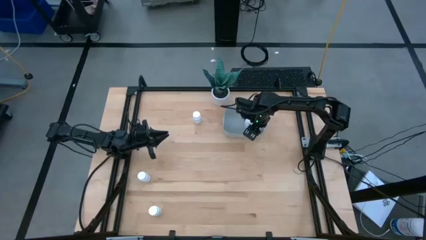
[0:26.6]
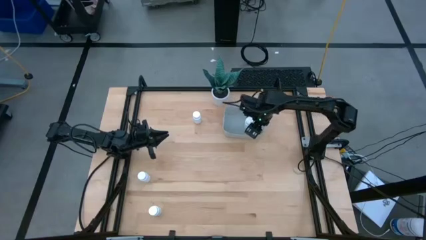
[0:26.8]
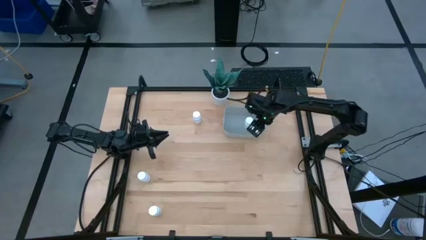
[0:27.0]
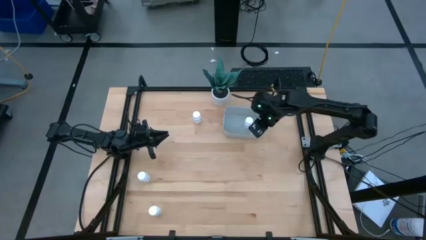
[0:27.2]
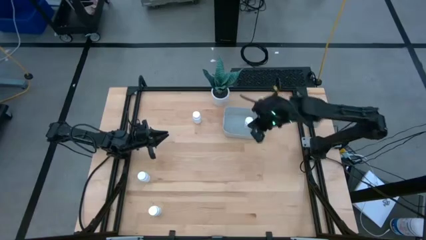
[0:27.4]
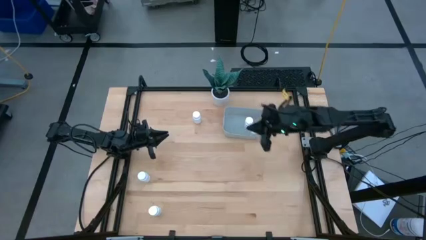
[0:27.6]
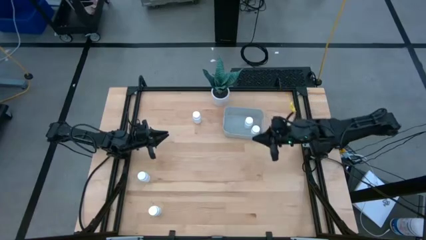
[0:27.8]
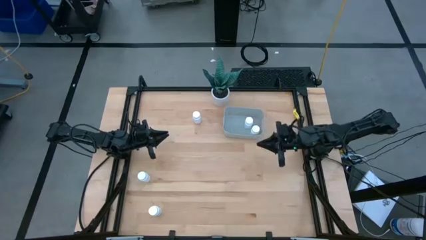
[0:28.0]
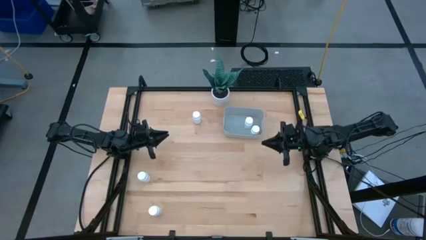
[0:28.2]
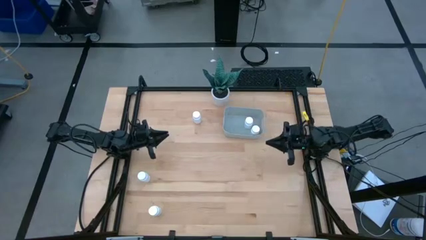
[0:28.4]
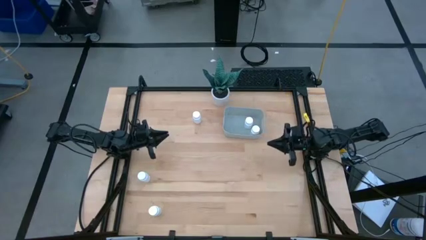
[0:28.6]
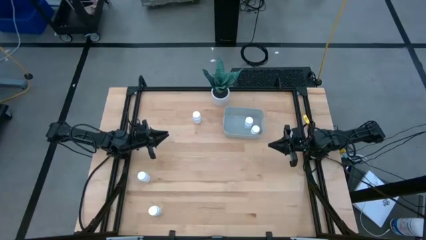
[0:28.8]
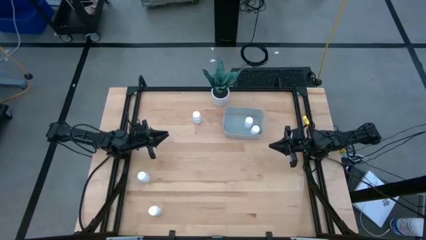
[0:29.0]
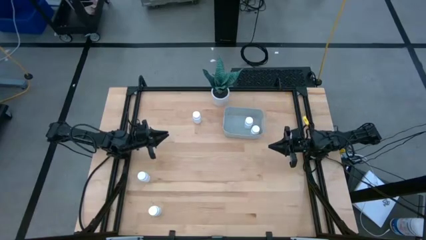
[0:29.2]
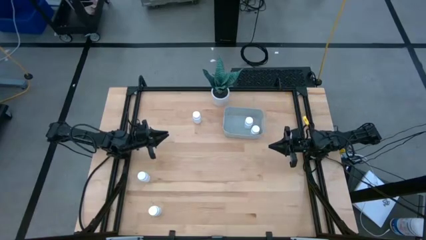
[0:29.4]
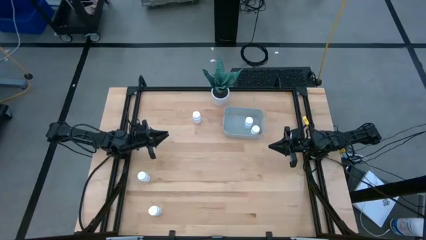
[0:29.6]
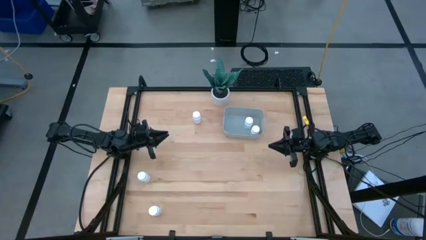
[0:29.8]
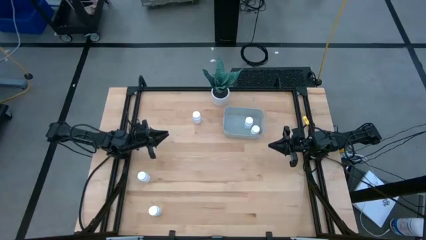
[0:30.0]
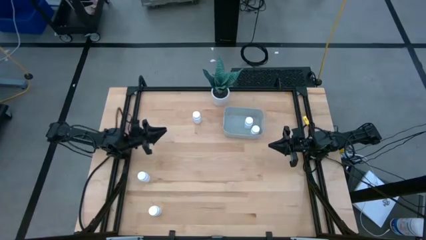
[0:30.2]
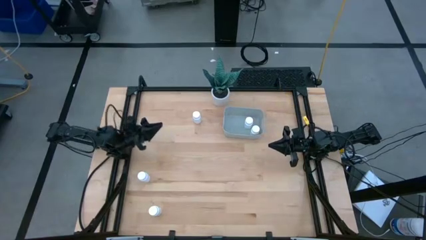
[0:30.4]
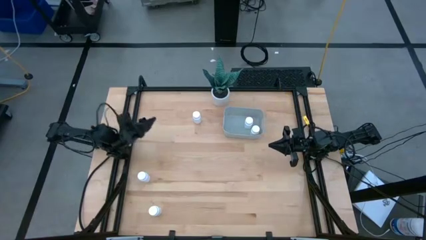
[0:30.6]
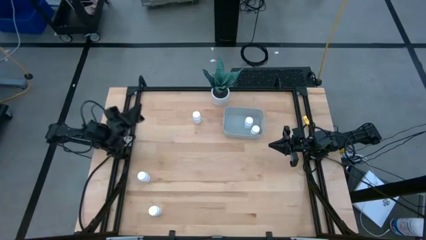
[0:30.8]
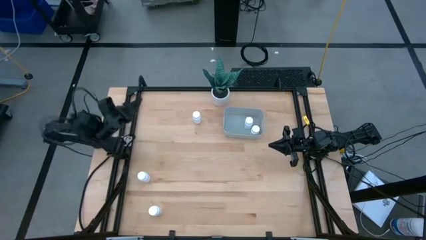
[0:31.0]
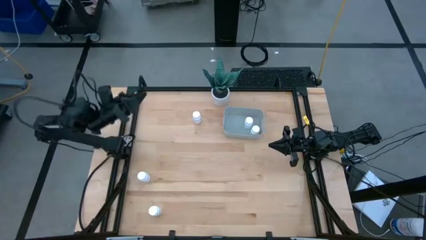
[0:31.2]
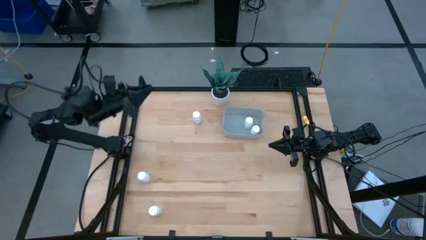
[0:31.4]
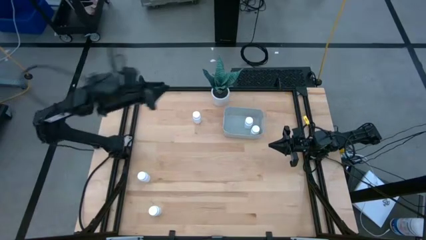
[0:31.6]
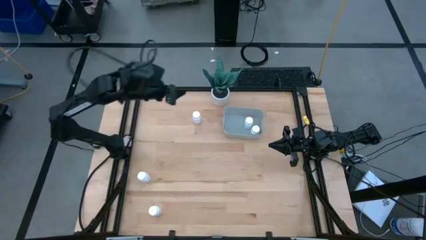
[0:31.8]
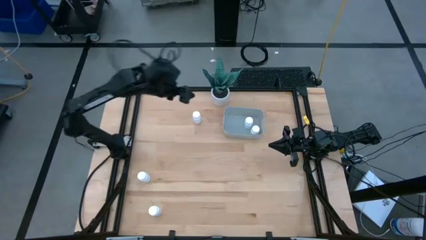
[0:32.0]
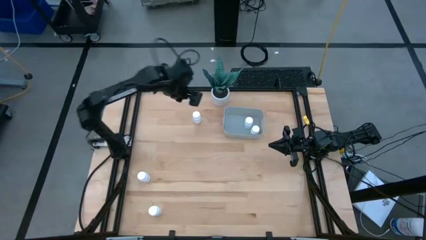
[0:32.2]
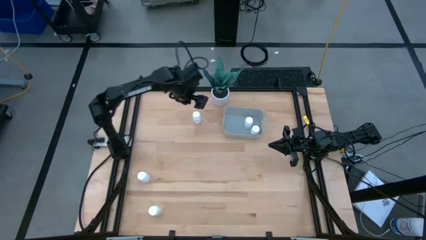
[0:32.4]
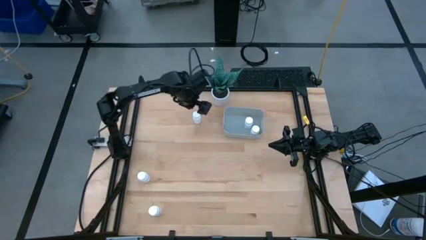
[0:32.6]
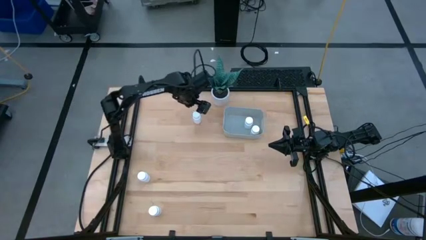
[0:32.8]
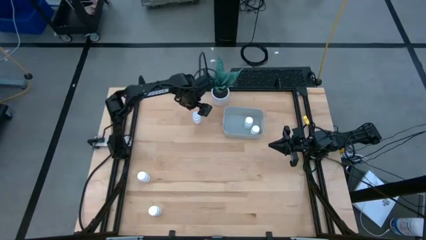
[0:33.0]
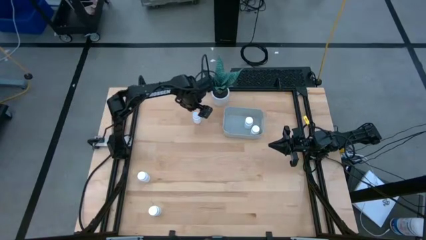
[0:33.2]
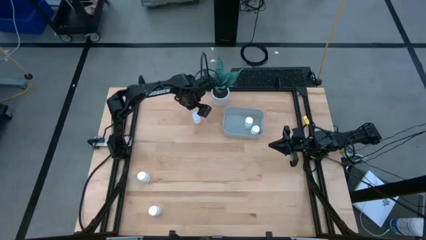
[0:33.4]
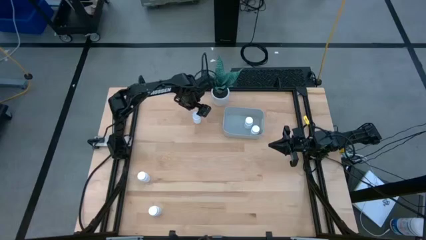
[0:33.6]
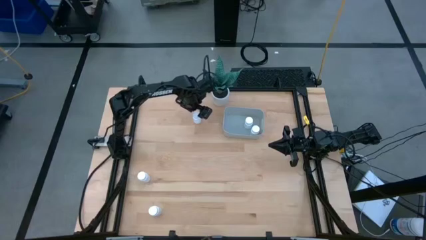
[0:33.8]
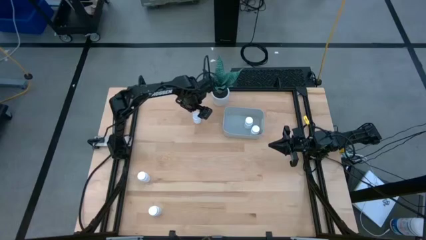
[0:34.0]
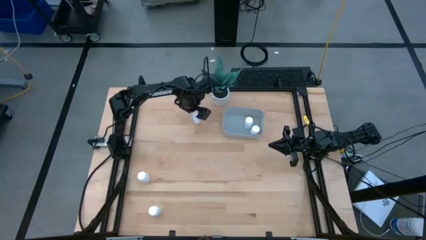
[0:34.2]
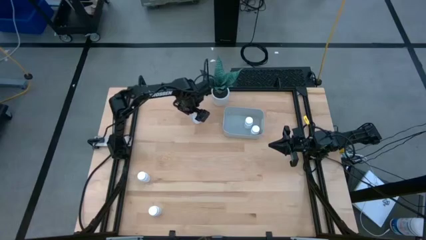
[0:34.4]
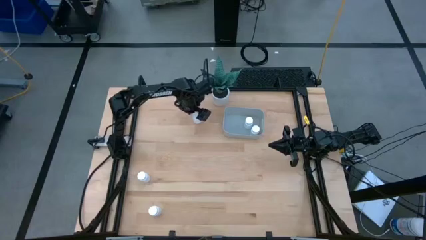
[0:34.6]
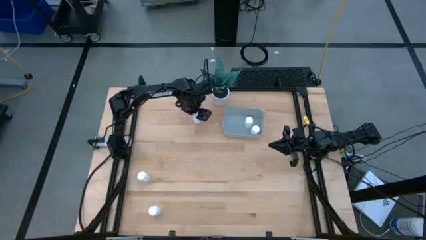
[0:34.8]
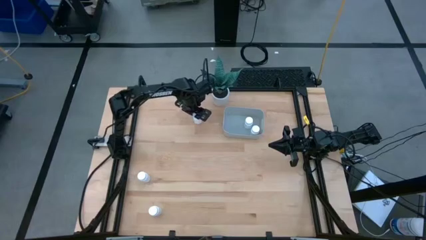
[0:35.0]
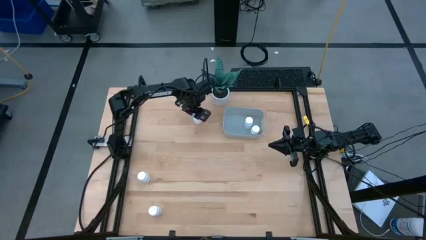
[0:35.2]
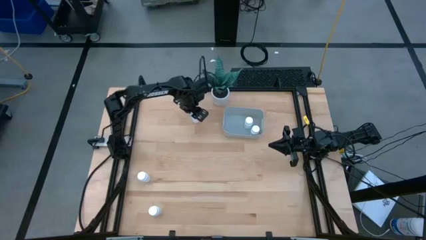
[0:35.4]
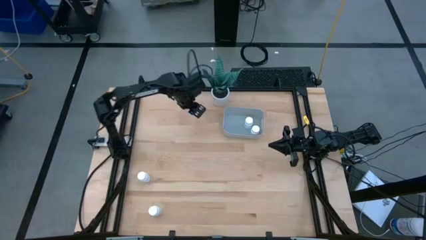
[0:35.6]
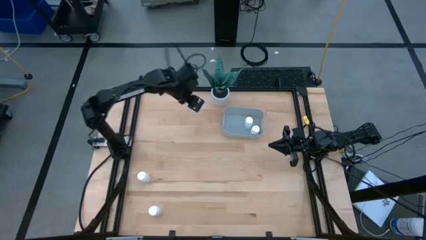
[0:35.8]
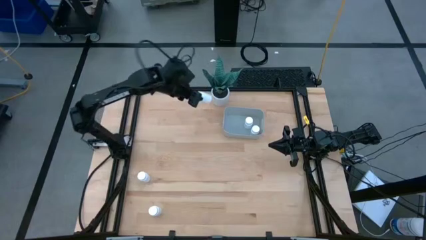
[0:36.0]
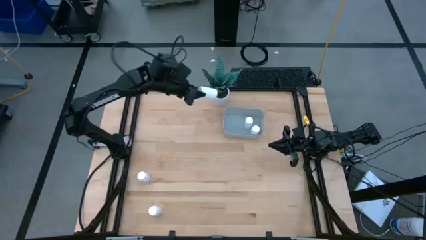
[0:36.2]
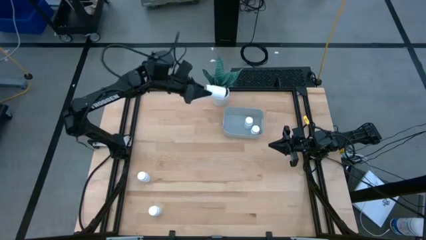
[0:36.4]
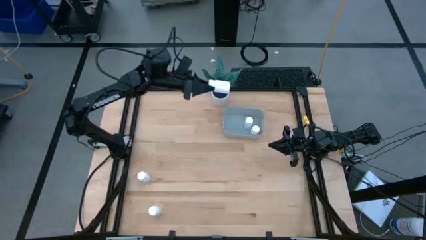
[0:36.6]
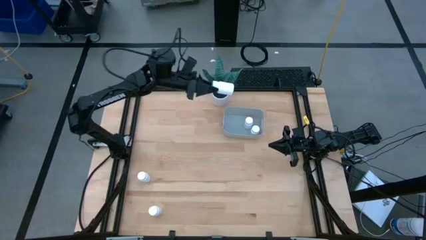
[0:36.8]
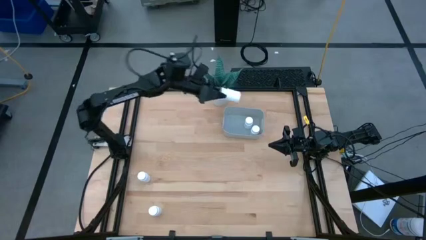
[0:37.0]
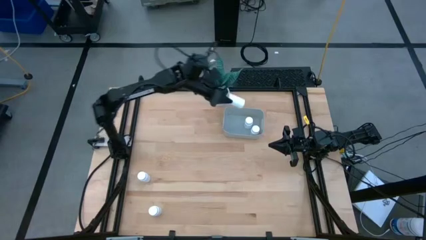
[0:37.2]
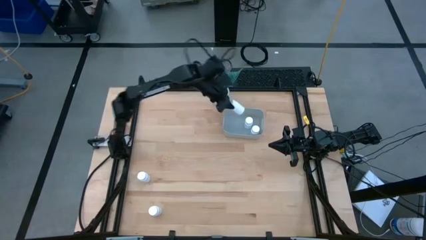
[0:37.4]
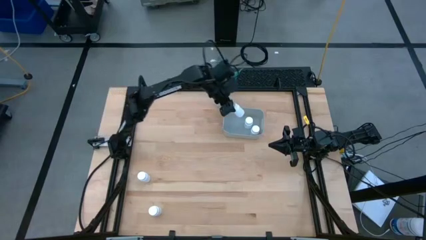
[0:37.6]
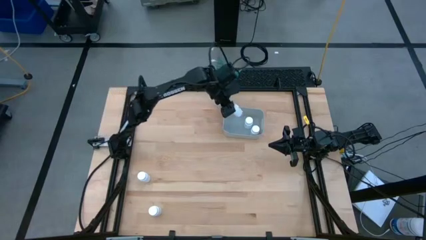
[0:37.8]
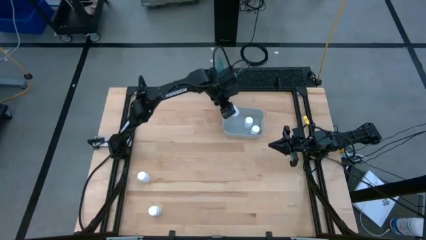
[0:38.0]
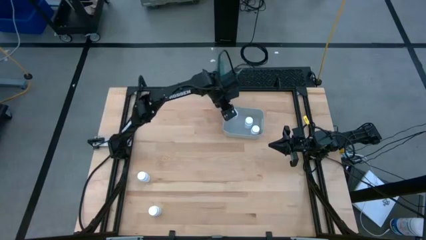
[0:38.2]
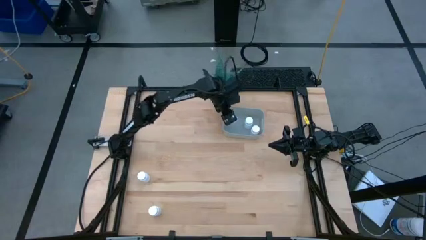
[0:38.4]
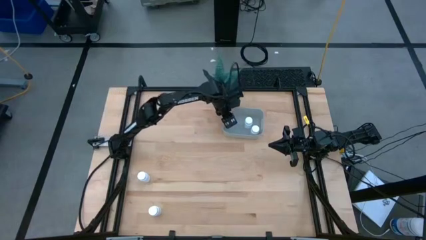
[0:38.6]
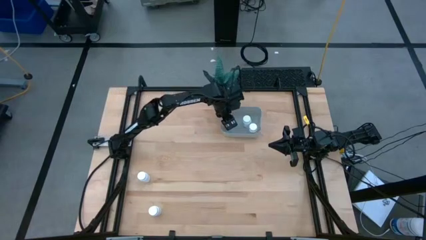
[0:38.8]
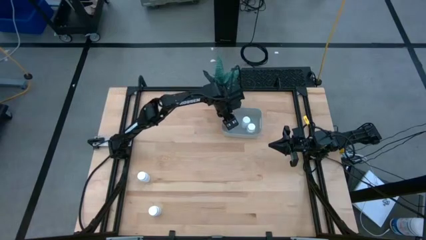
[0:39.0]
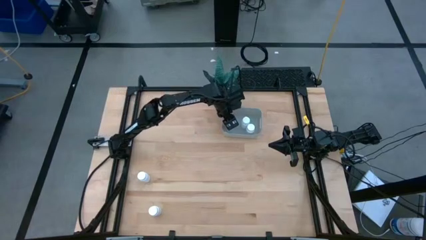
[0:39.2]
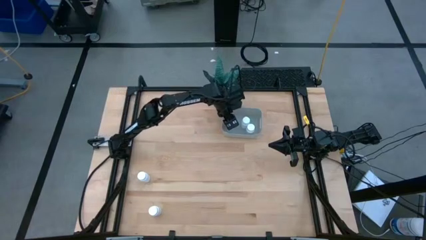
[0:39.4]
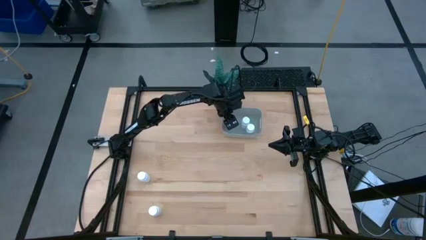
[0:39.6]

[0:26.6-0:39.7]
Task: Pick and place pill bottles into a basket
Put the white pill bottle into the gray bin

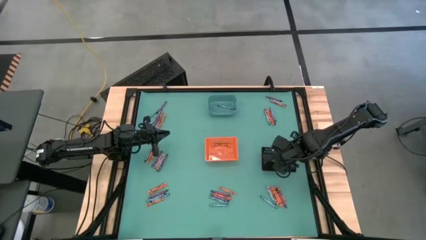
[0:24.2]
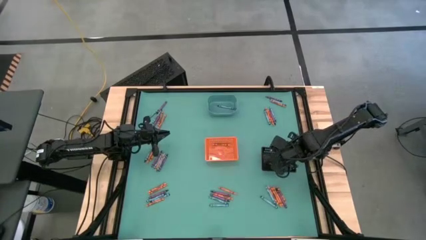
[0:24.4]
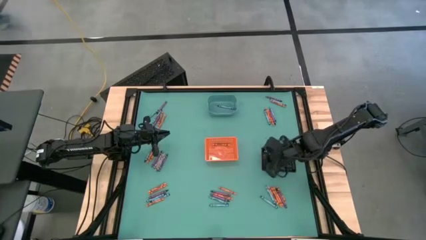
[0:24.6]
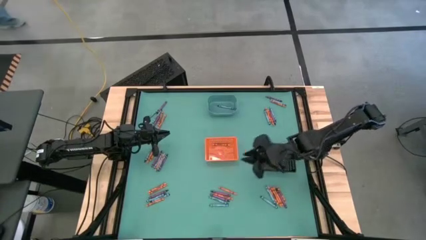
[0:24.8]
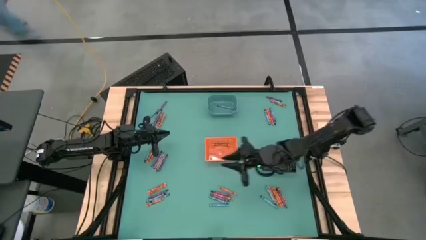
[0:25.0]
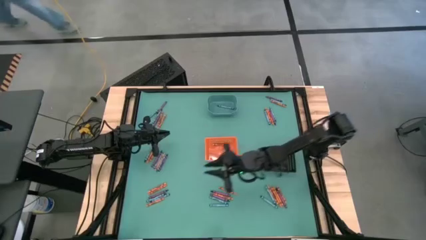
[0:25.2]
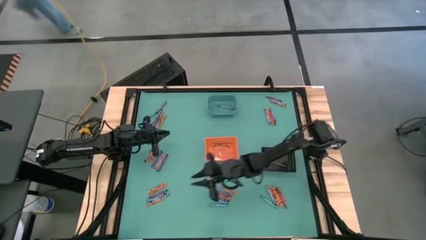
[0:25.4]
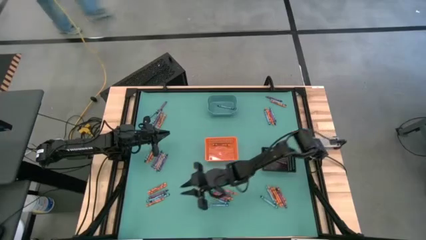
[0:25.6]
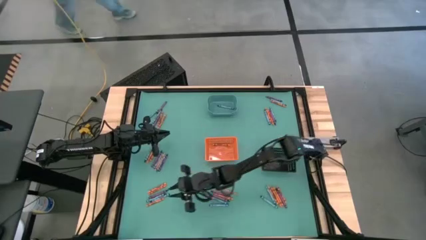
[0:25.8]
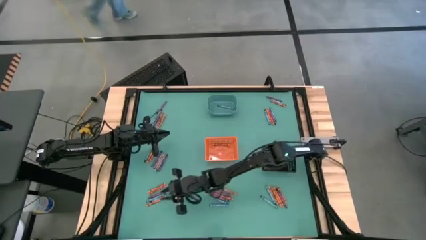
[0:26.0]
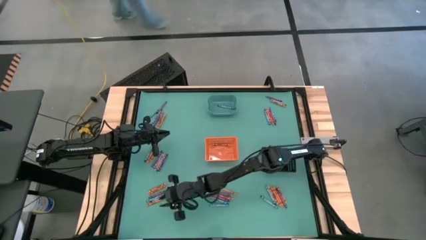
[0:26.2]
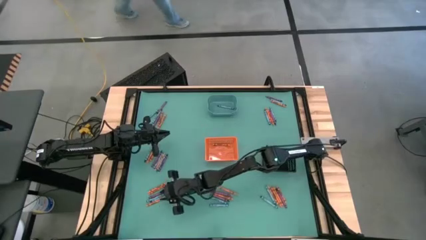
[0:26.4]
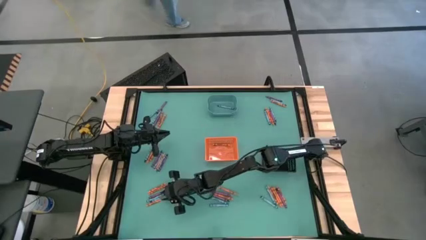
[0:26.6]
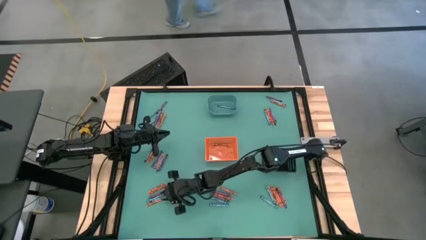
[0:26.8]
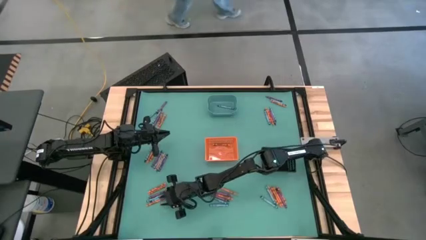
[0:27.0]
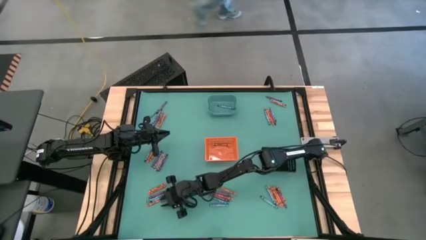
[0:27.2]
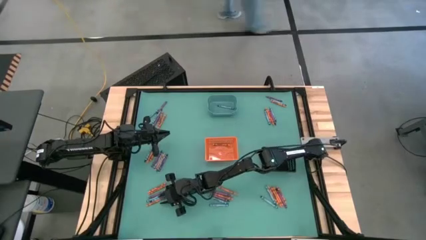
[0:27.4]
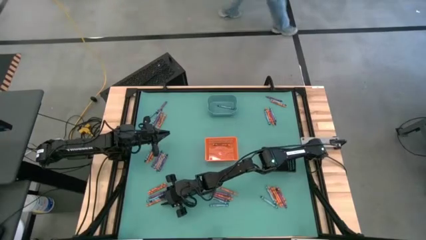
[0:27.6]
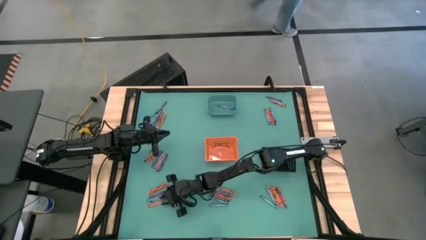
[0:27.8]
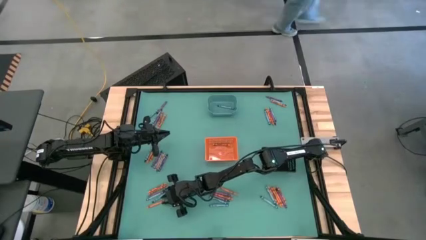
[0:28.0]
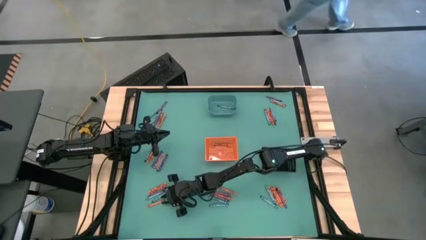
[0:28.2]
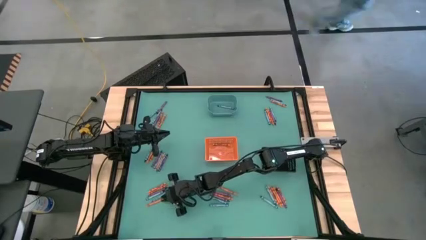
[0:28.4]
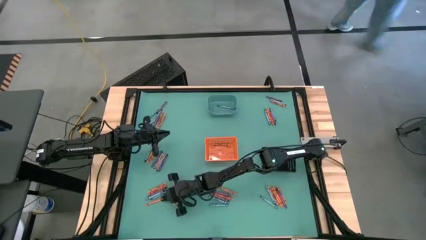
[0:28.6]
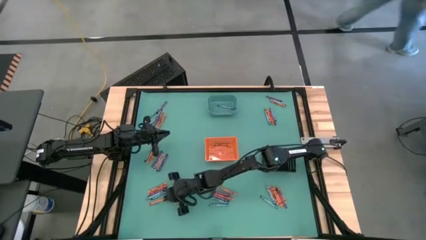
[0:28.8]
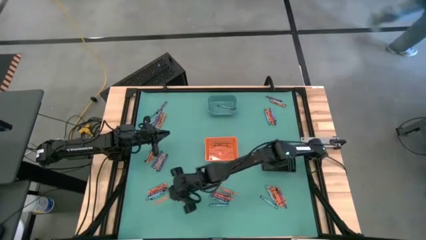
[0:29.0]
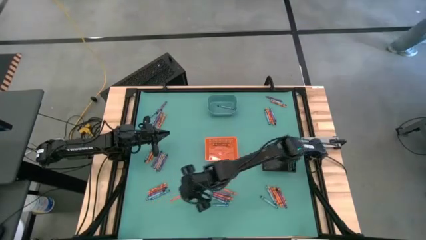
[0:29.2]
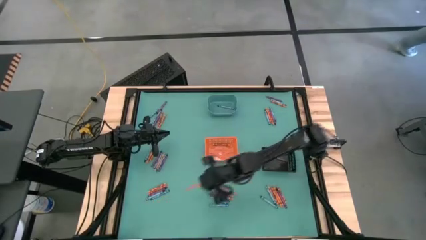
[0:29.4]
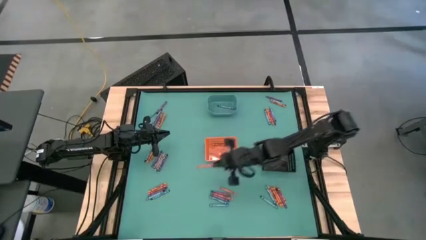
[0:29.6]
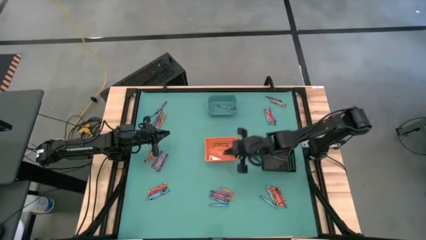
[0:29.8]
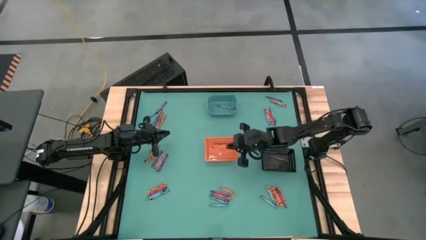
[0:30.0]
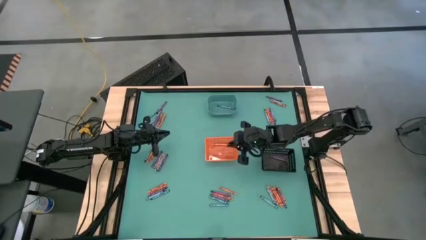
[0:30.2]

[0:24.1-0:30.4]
Task: Sort crayons
Put the orange crayon into the orange bin
